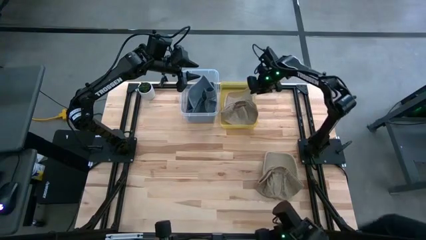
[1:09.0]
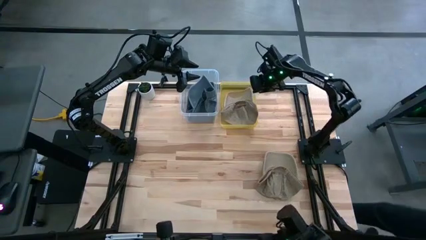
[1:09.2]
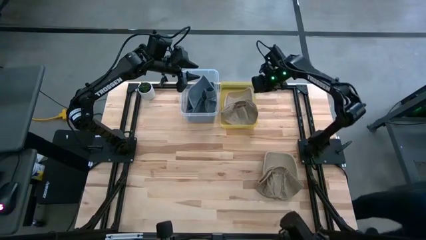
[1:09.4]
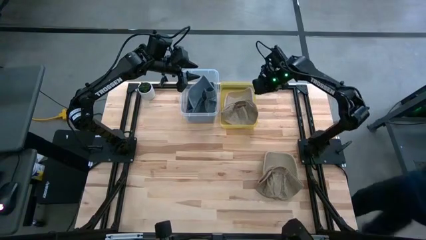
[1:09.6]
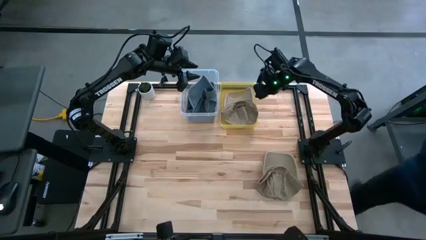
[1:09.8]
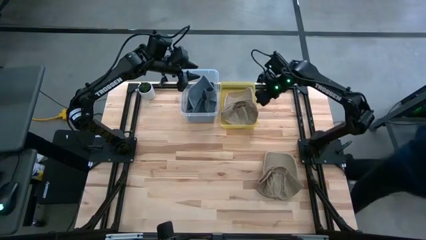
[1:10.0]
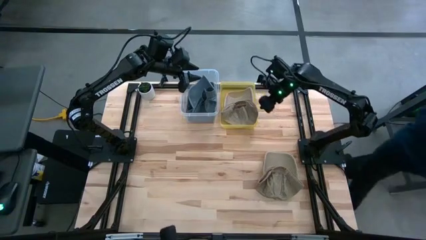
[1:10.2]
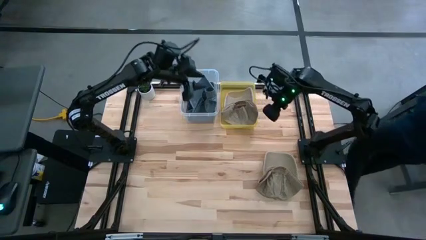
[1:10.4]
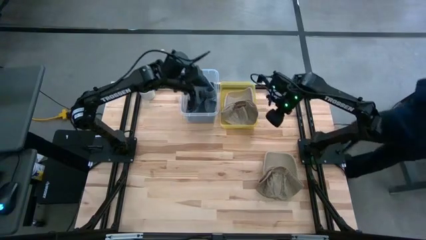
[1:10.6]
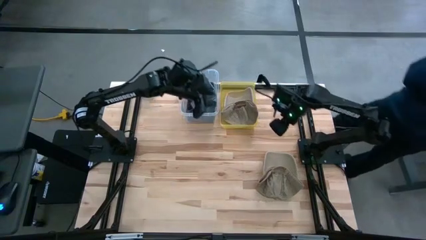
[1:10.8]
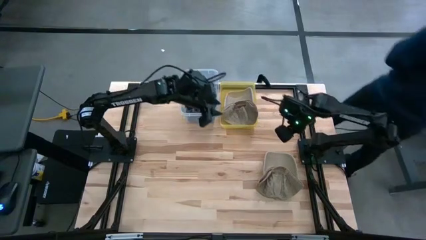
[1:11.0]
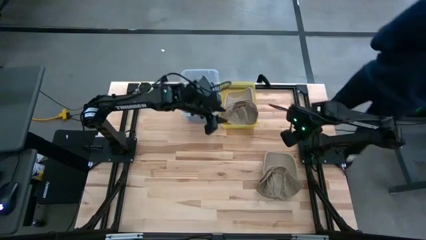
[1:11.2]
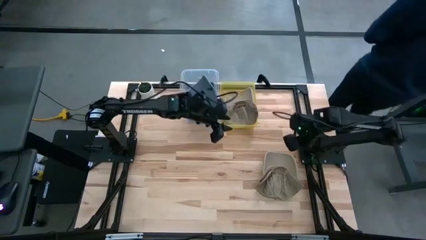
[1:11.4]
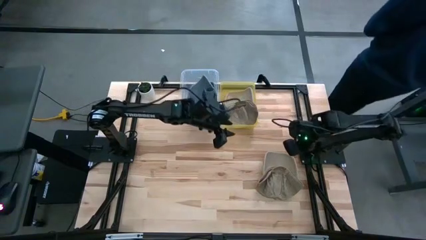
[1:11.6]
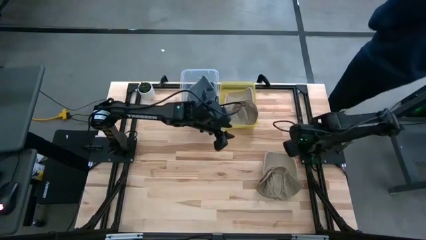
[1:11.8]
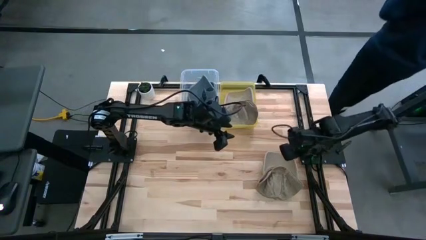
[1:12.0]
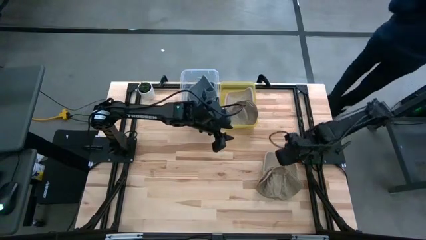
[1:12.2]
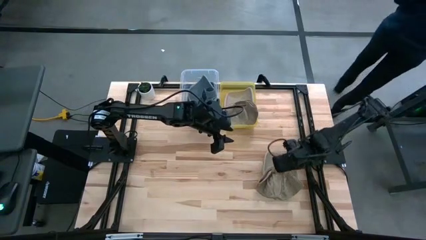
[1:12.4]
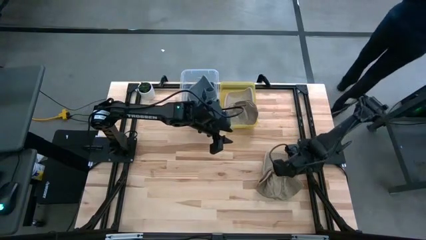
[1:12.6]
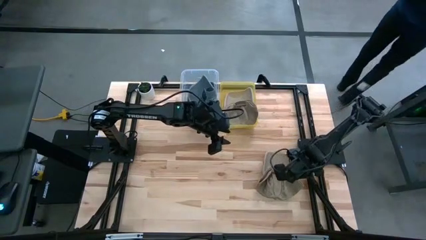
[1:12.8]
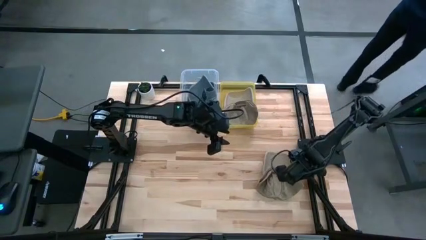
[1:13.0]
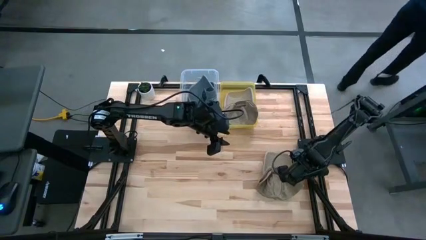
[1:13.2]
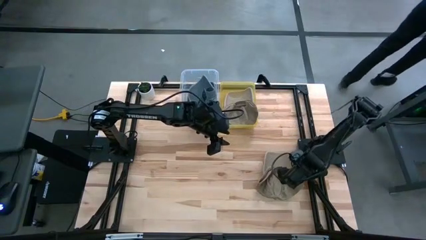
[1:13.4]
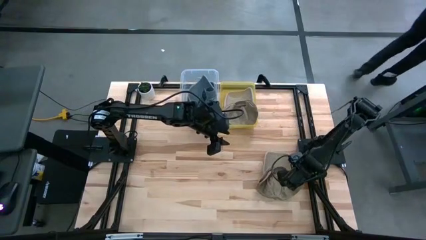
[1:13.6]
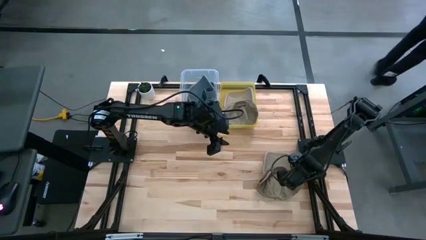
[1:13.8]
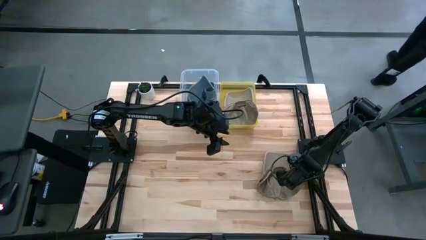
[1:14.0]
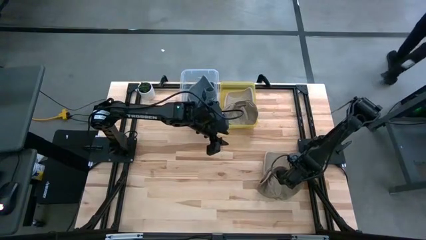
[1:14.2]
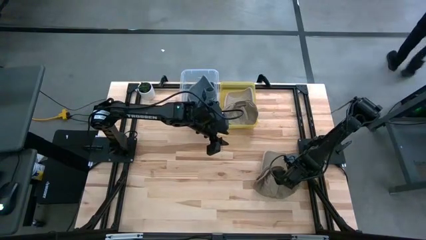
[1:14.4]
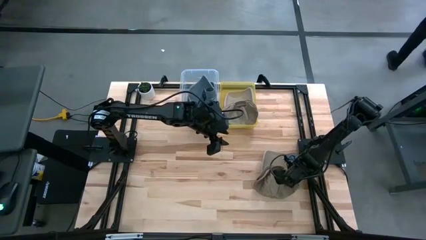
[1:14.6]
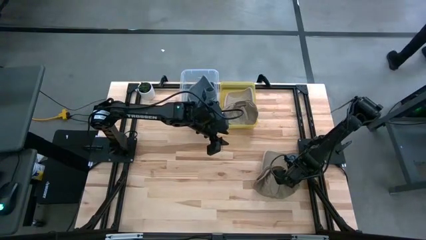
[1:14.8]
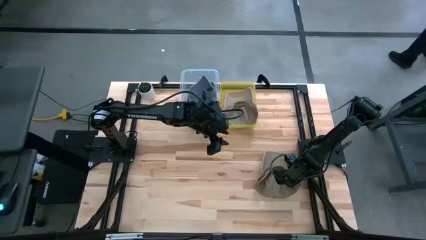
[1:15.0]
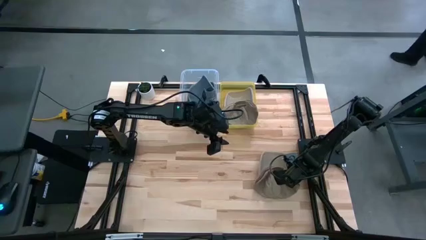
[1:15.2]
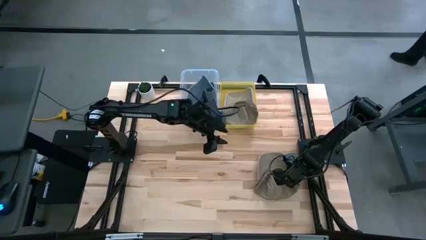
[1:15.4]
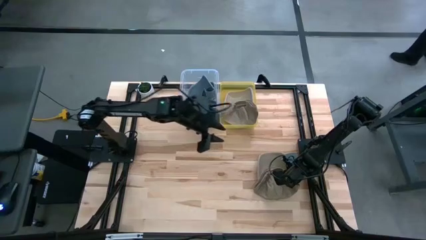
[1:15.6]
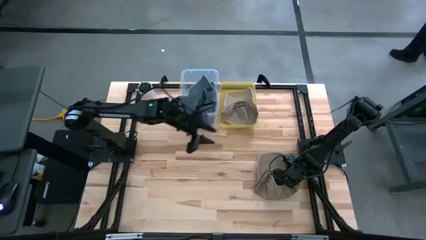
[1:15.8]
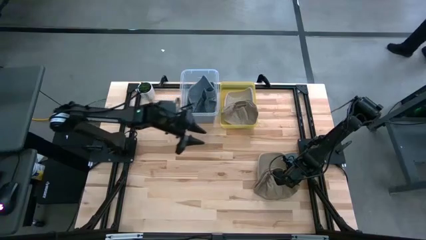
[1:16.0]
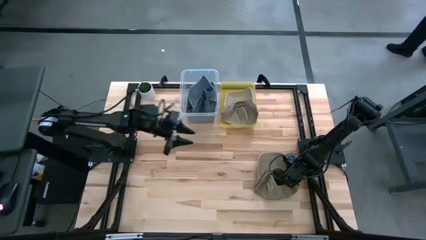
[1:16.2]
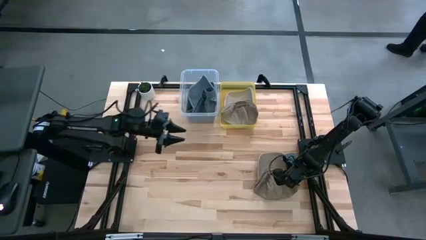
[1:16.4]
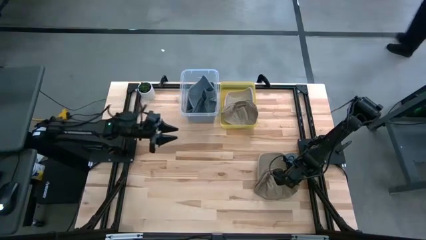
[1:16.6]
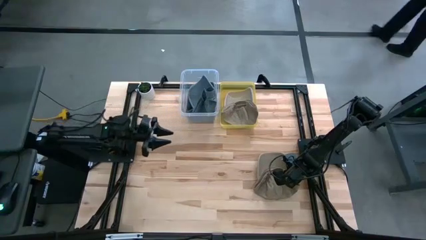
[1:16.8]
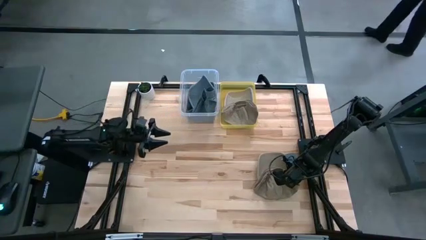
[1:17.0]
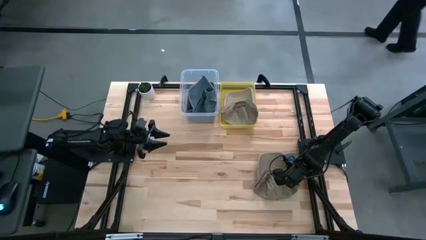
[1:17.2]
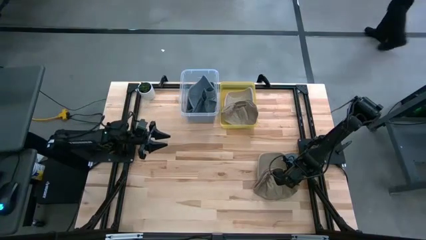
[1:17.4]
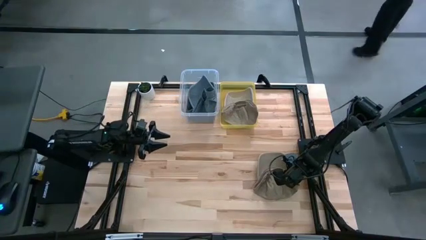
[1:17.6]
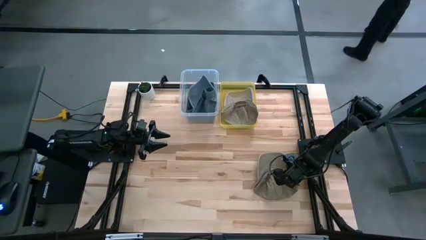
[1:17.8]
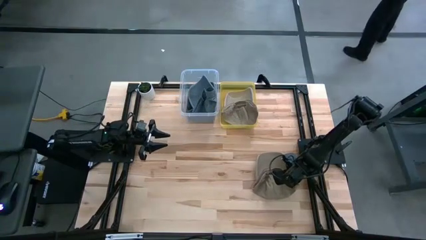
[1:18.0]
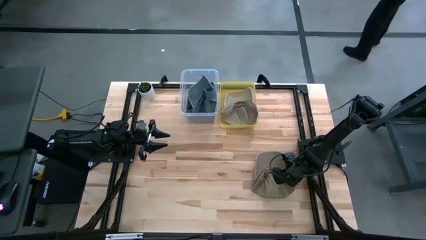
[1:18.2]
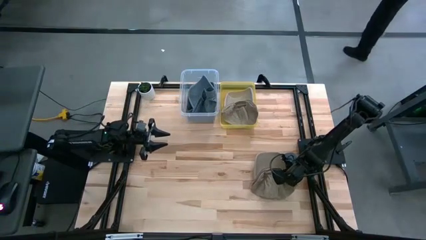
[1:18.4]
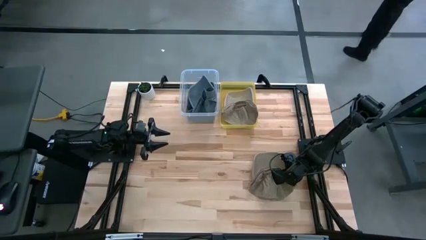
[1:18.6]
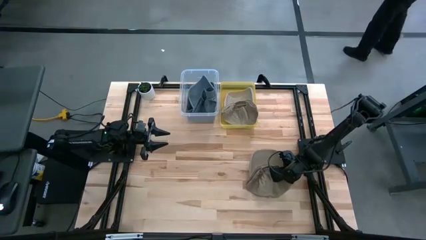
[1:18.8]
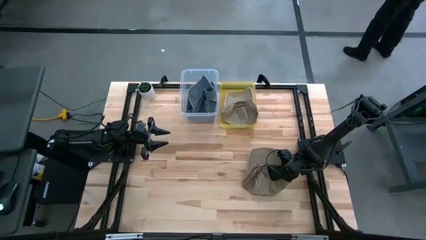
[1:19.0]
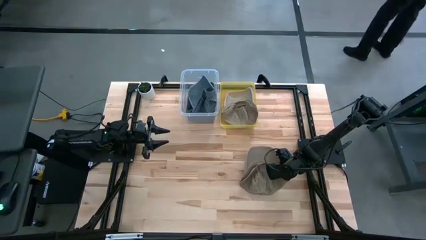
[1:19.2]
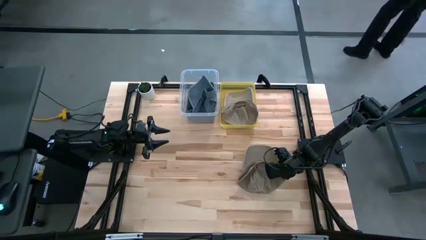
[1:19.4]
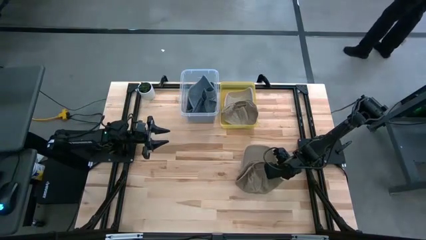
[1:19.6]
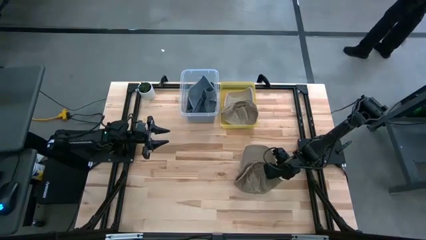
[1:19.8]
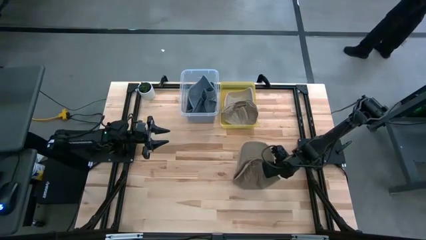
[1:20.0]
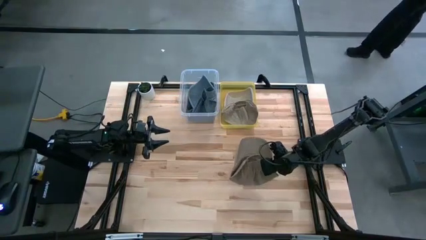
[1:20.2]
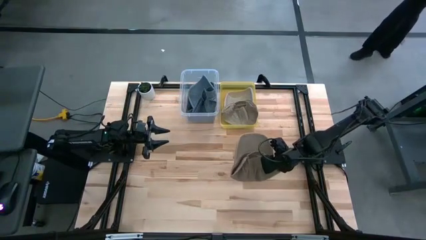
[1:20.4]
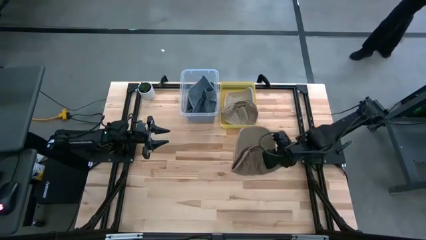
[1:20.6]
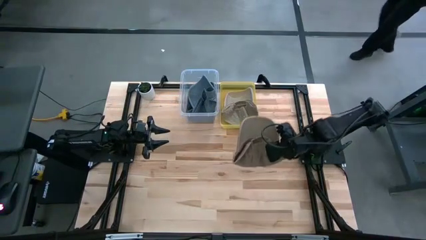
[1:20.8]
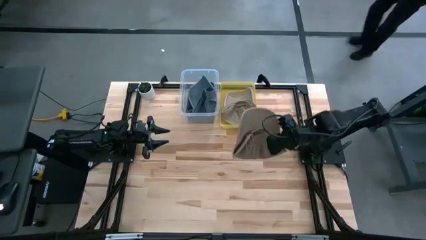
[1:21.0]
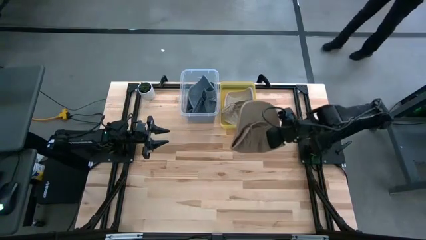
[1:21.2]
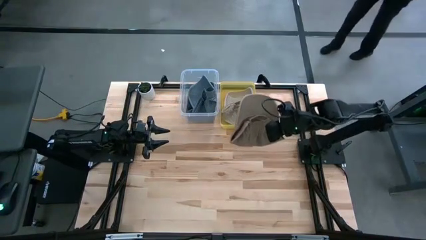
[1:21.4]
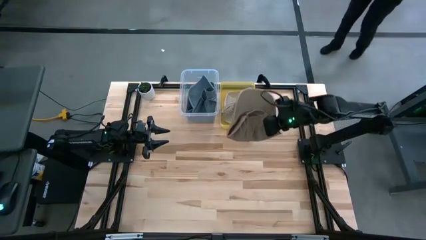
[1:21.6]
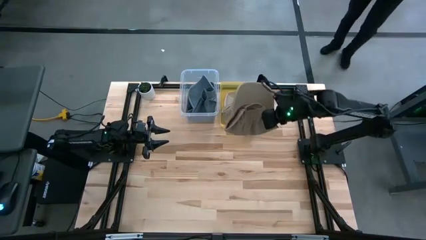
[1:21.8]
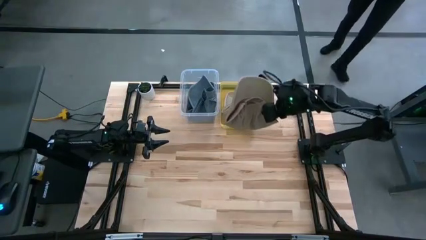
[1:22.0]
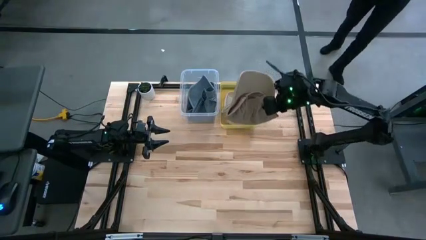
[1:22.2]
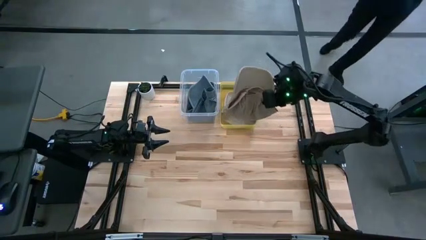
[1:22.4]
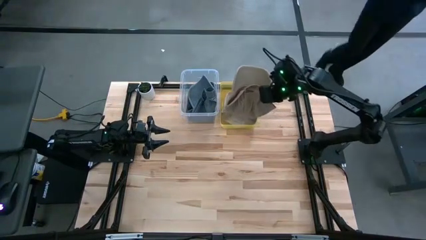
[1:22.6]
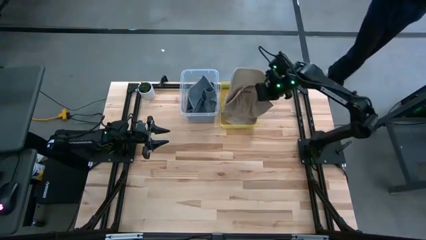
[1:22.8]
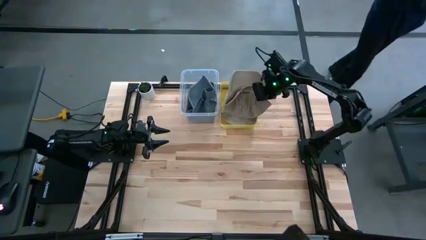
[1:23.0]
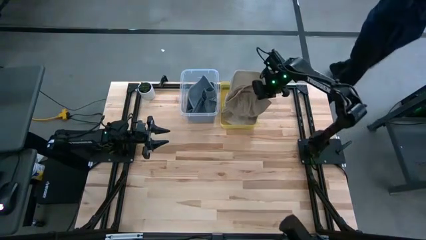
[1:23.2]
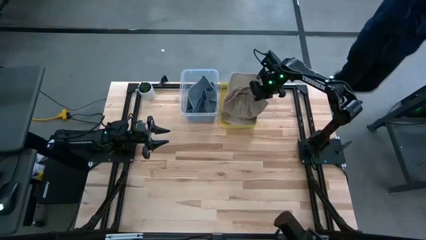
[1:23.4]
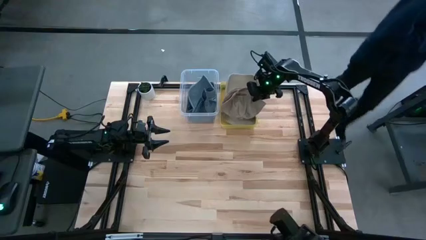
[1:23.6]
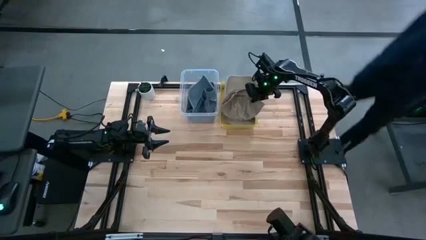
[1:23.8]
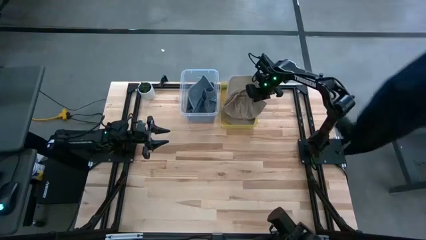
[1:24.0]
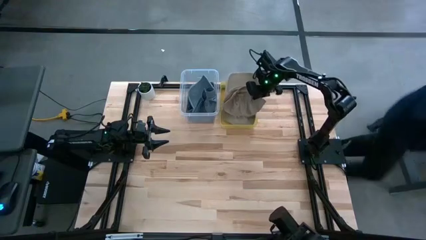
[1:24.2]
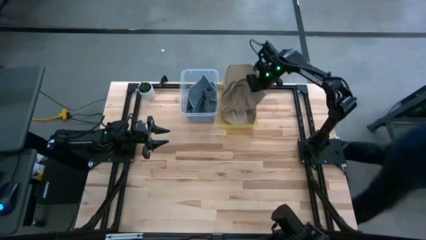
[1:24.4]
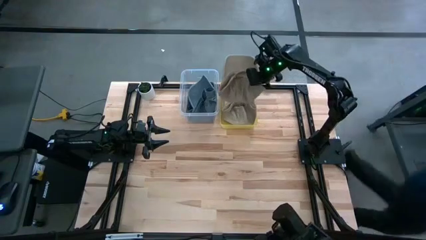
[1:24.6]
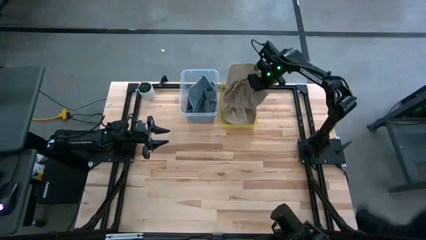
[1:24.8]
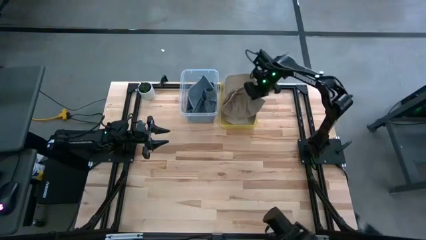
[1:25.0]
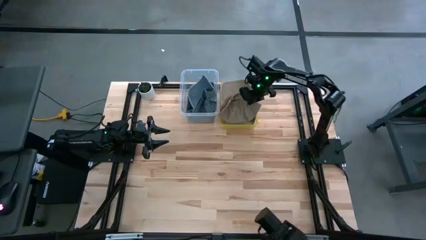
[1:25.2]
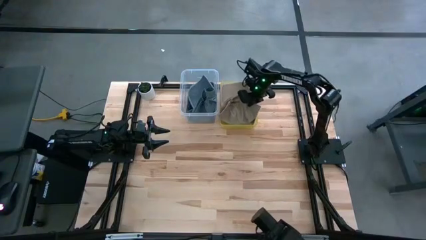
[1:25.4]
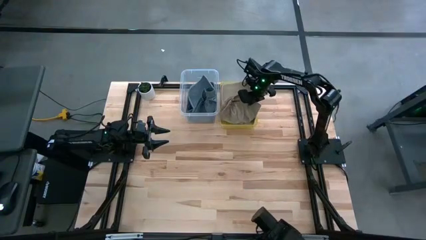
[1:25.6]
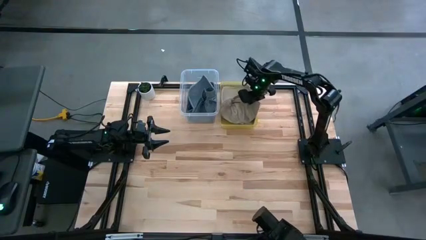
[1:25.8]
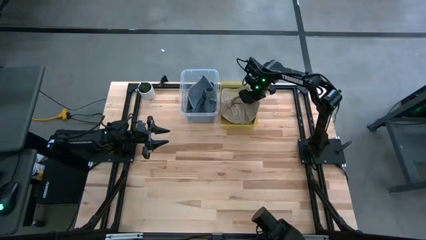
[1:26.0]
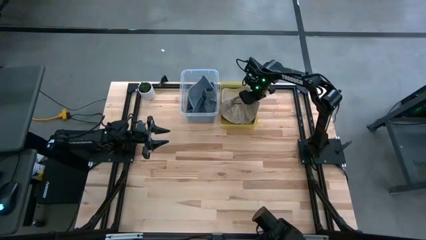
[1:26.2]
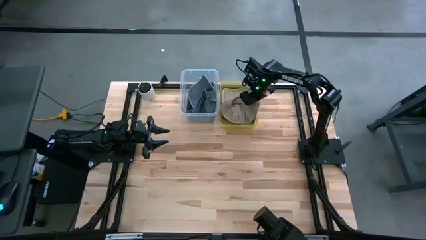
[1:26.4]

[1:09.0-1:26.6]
Task: Pick & Place hat
Put the brown cap into the yellow bin
